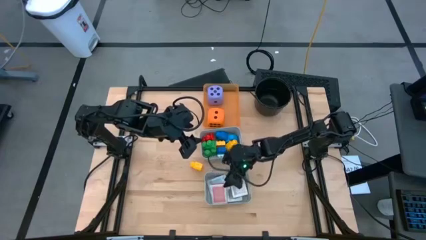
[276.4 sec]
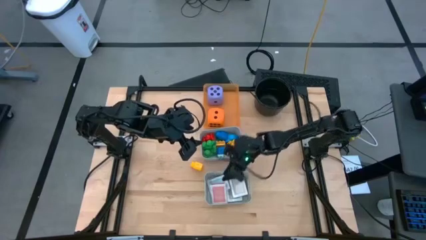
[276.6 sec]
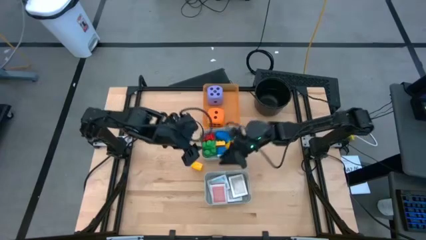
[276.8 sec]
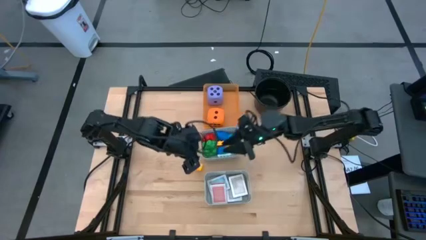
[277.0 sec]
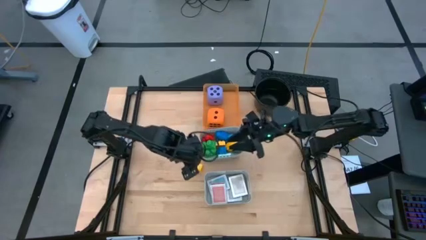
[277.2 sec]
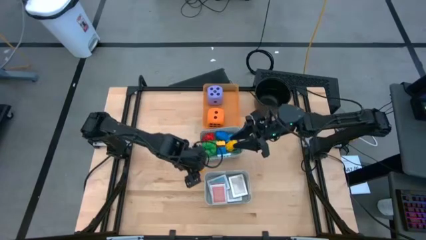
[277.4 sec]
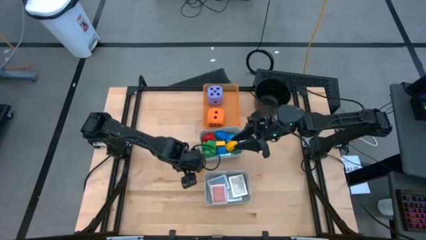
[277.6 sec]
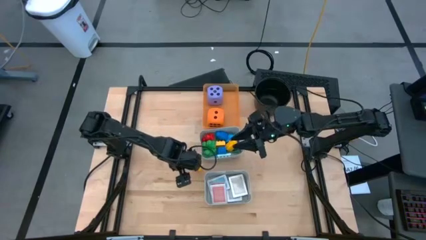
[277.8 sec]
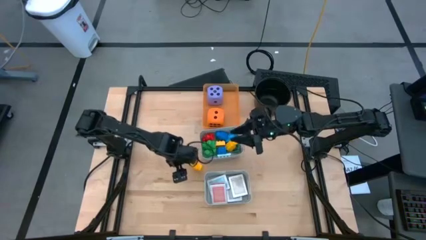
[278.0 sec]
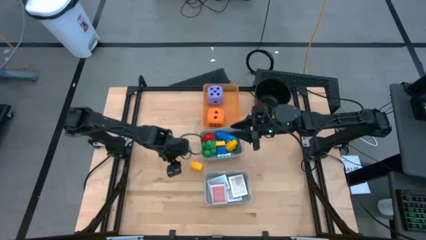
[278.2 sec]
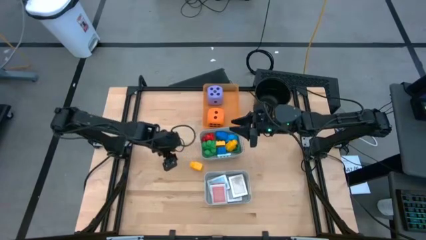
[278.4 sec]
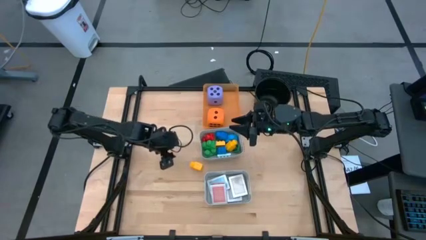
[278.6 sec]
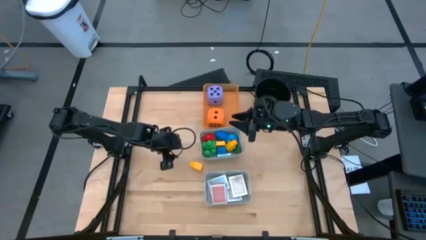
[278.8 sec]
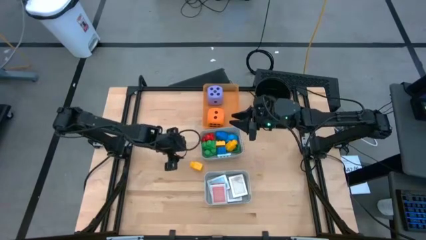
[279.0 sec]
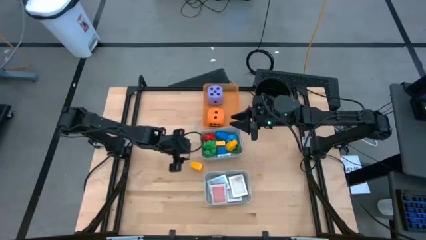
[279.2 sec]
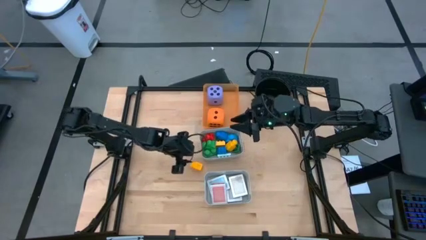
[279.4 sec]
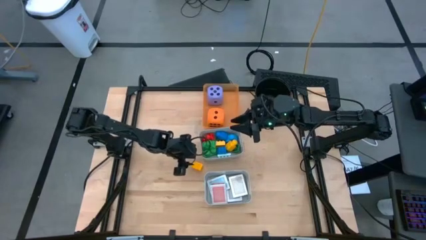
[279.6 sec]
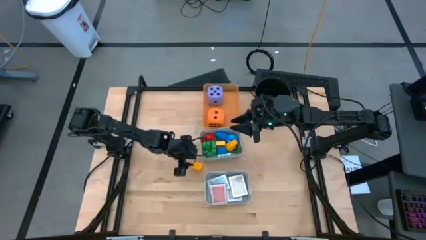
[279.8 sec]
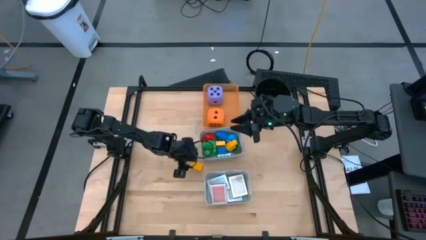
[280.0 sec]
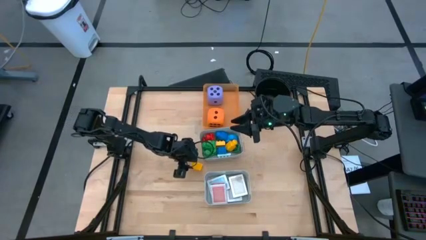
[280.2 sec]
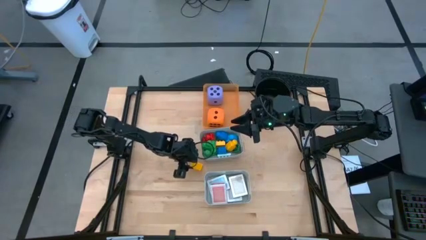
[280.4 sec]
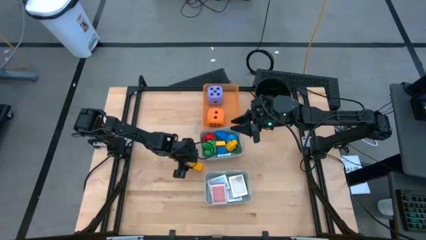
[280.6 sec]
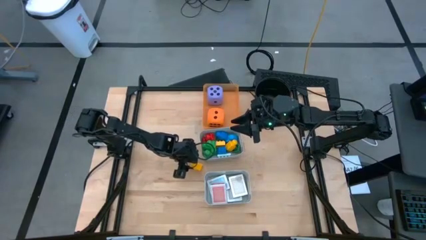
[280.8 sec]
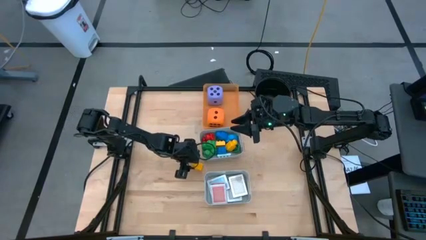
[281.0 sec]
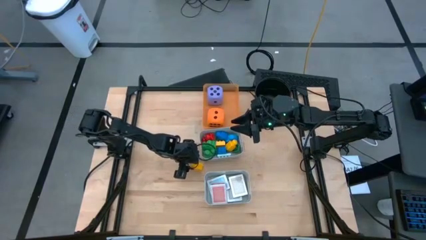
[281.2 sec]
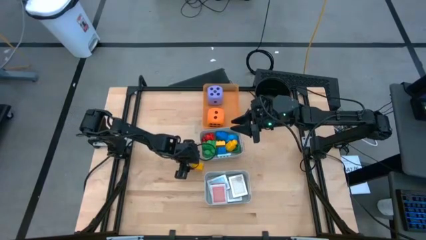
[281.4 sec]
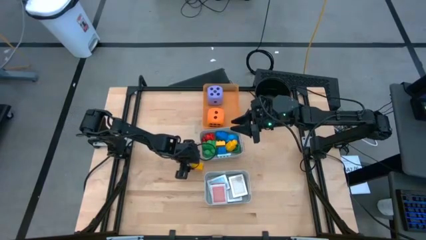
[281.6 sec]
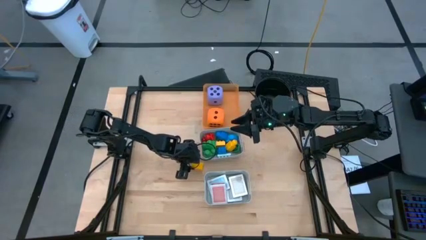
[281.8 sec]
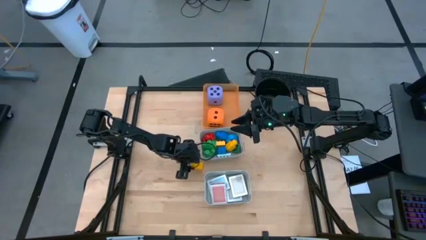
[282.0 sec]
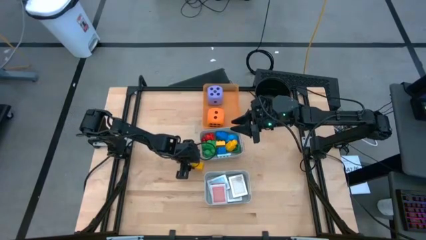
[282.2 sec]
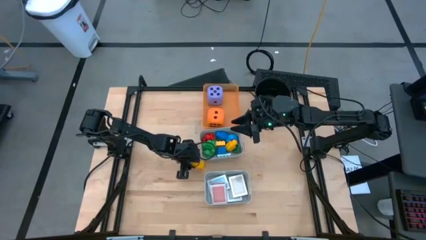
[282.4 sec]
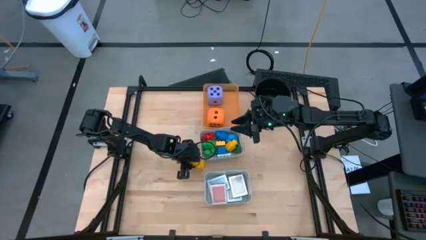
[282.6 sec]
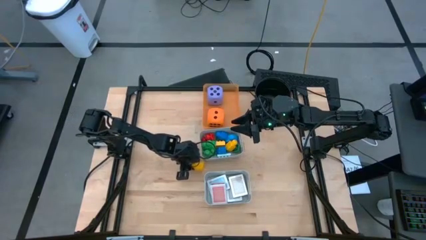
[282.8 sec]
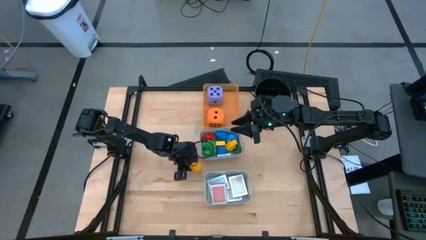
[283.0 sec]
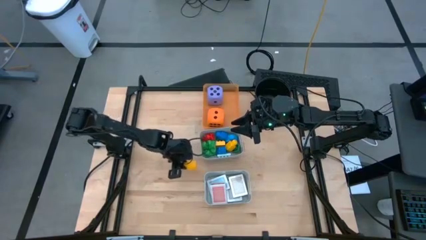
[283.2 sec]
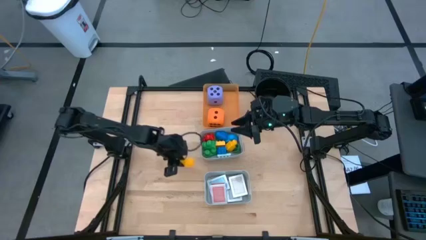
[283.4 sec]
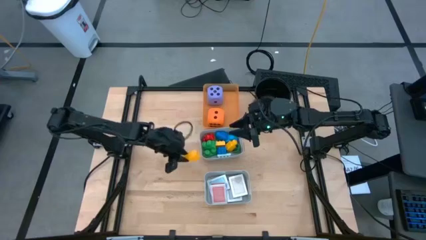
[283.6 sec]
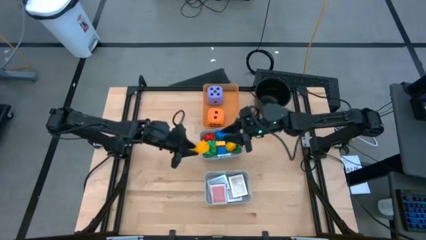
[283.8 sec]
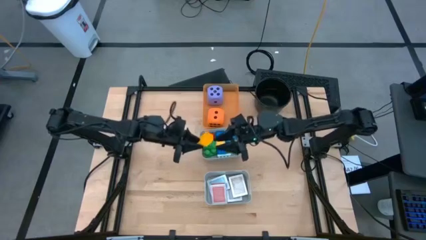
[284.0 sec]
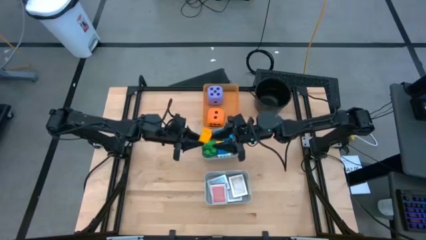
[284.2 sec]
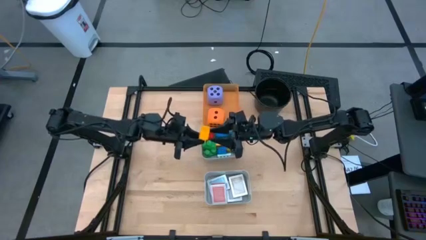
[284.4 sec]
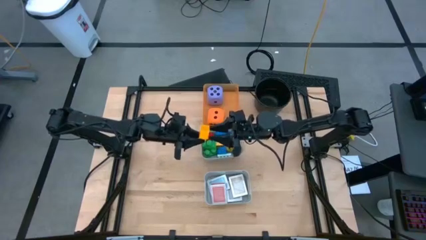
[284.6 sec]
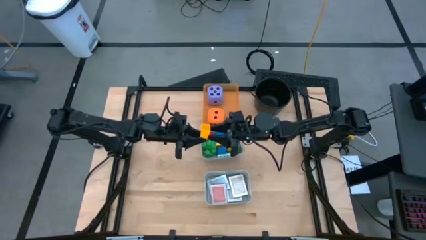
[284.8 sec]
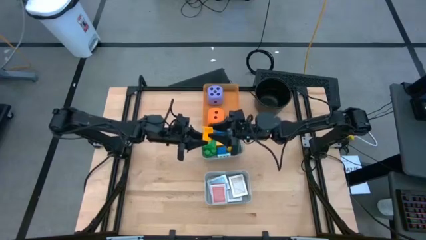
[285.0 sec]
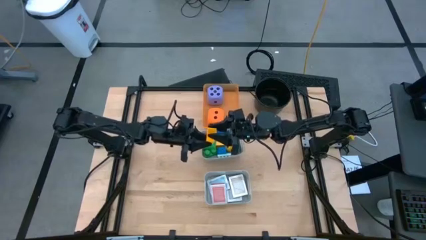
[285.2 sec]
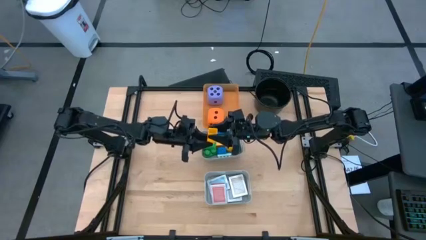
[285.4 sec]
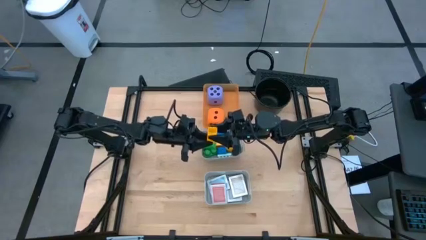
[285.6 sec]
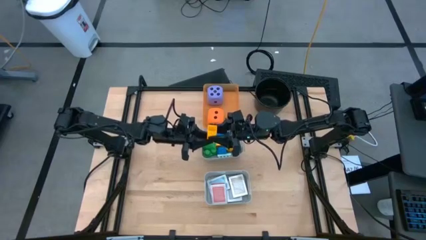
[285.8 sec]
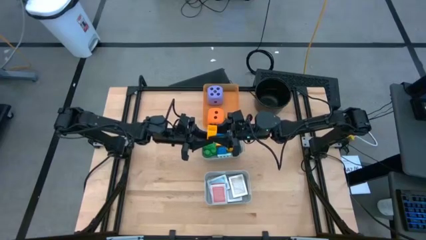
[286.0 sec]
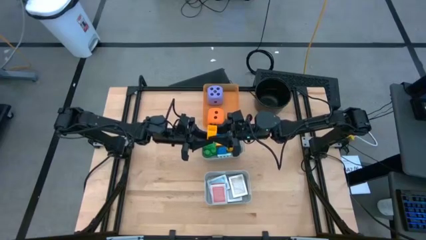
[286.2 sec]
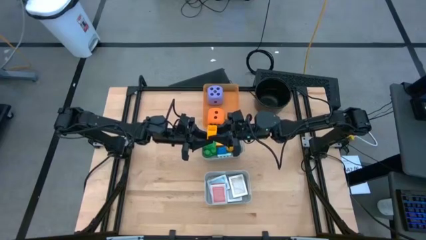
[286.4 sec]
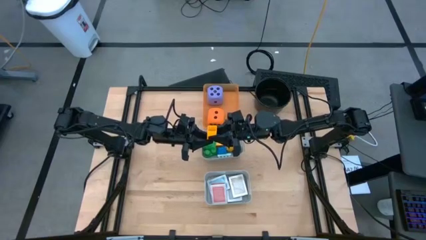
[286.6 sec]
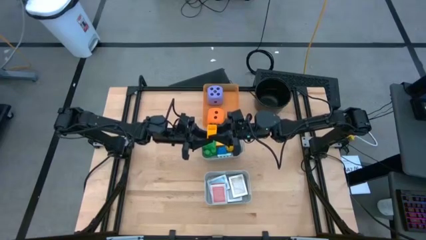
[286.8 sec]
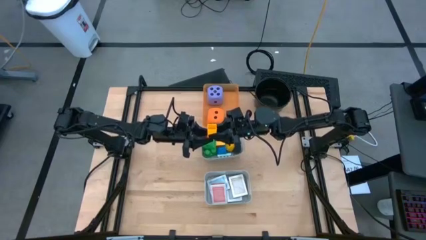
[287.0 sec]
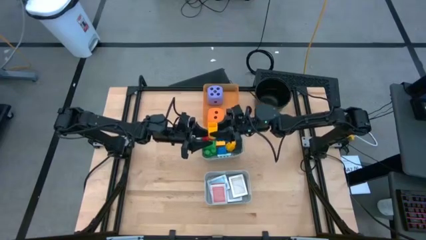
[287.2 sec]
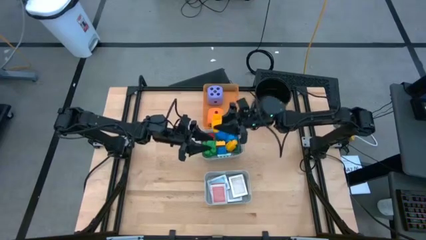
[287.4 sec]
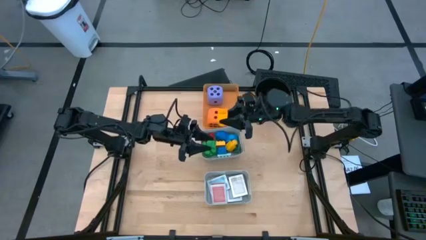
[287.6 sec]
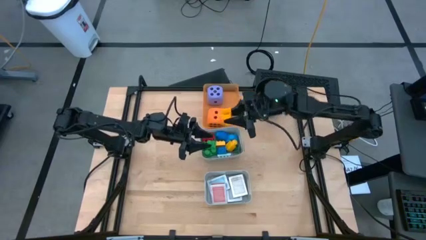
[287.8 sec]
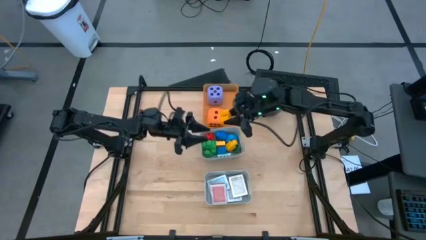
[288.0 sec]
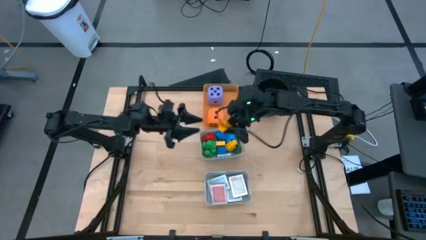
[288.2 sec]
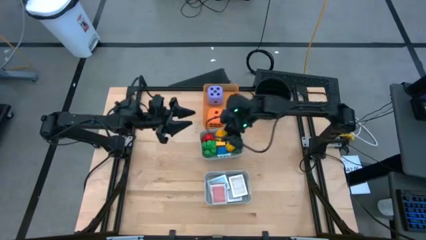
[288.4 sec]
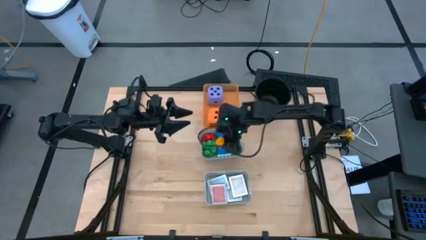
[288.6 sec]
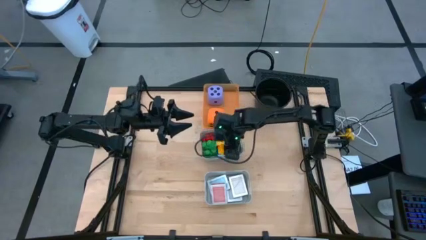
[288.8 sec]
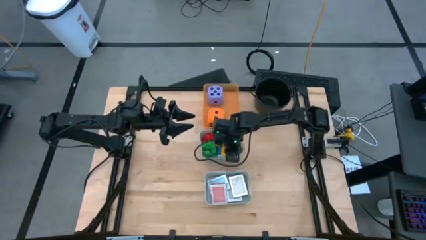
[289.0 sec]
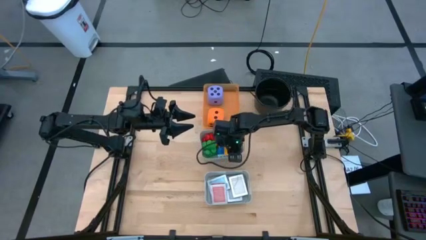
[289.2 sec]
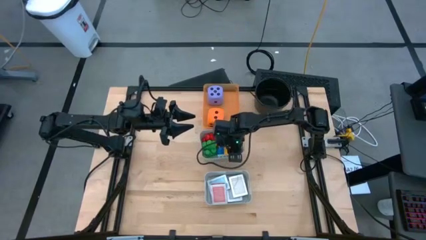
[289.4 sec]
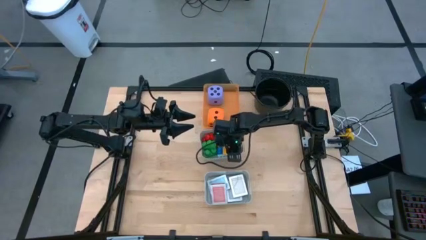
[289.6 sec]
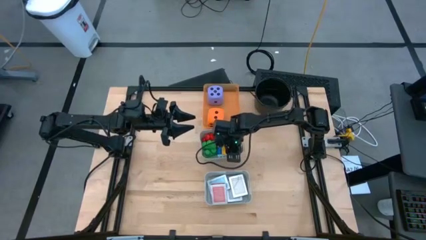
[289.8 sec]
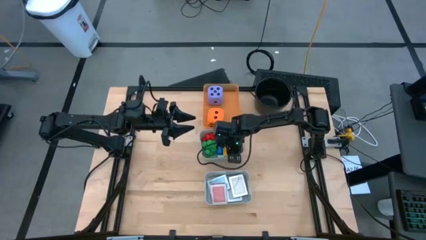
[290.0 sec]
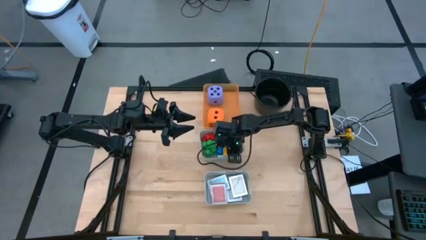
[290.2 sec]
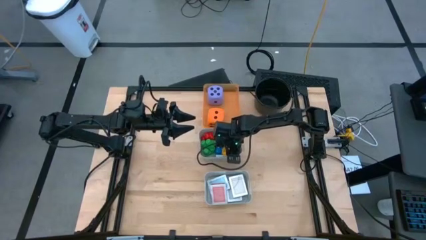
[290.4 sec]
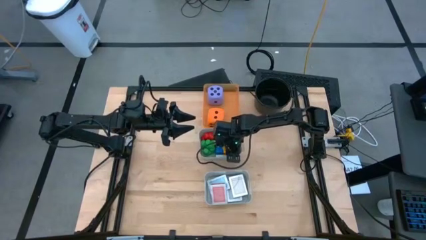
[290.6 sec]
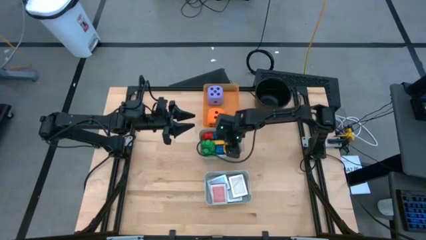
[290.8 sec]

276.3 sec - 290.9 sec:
Task: Pick & Place Toys
Put the yellow game piece into the top gray bin
